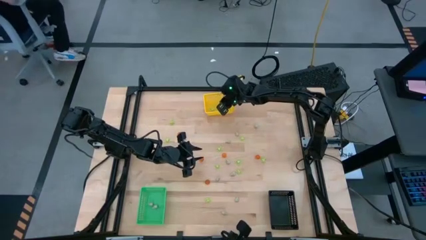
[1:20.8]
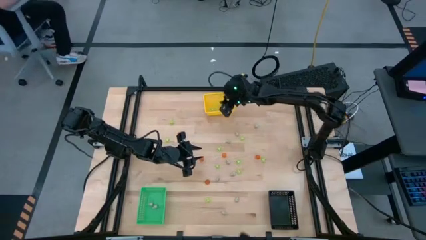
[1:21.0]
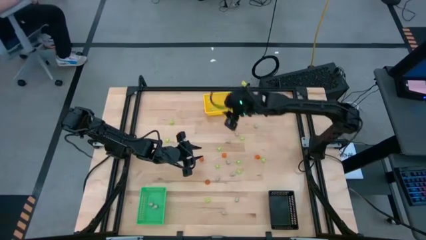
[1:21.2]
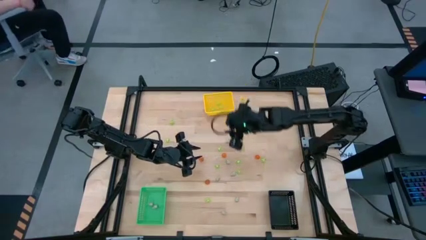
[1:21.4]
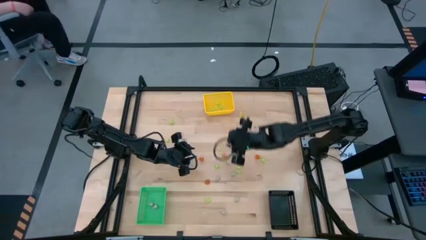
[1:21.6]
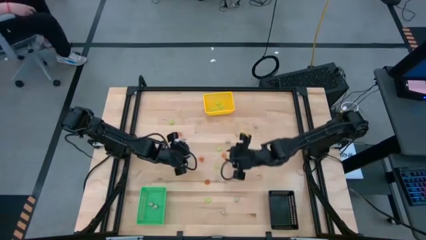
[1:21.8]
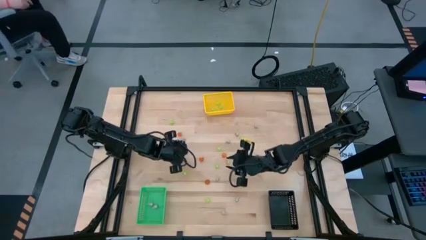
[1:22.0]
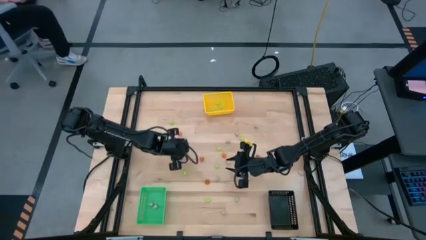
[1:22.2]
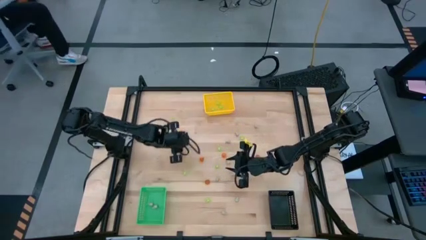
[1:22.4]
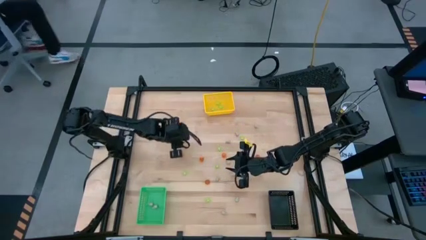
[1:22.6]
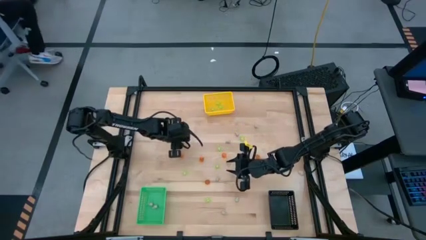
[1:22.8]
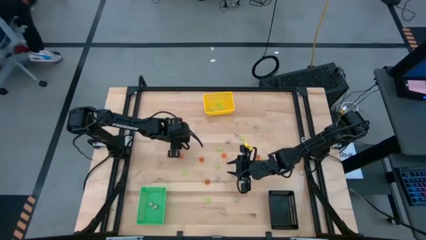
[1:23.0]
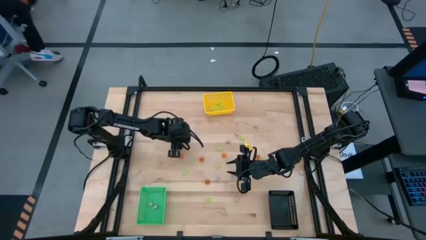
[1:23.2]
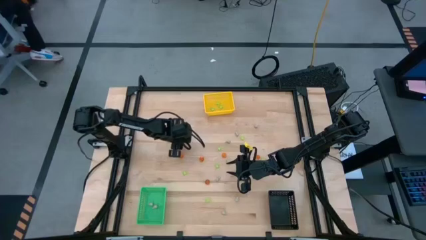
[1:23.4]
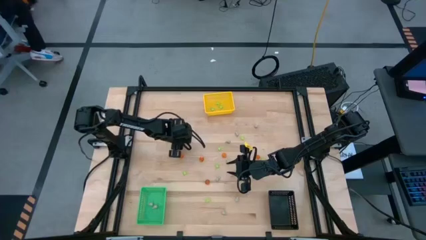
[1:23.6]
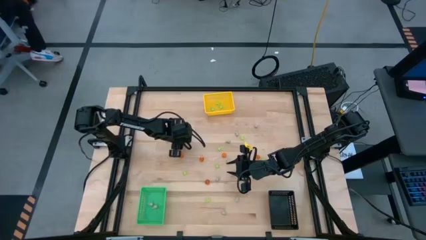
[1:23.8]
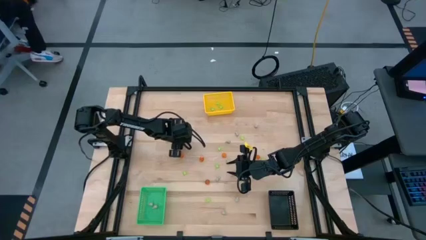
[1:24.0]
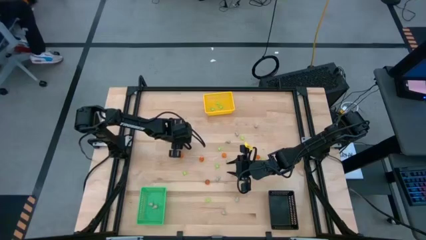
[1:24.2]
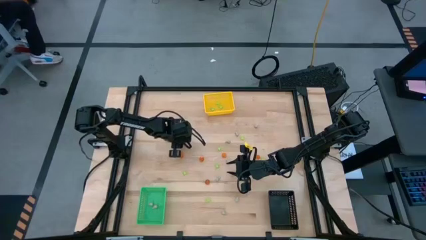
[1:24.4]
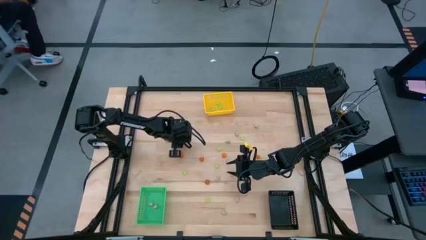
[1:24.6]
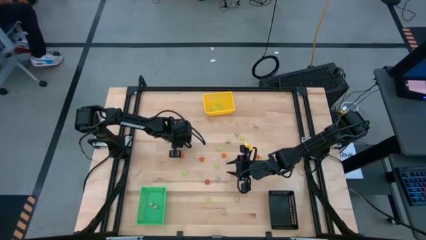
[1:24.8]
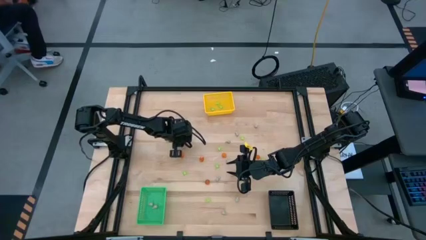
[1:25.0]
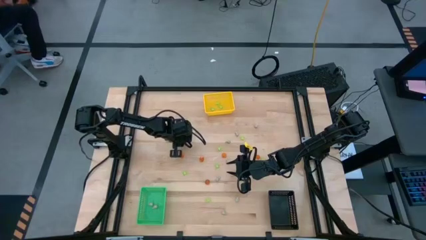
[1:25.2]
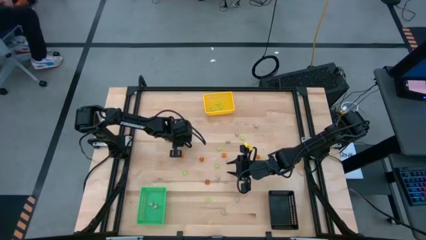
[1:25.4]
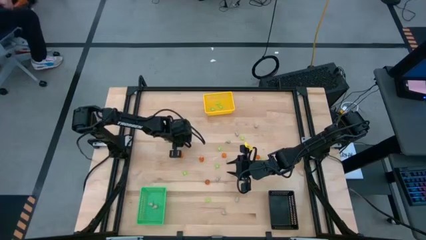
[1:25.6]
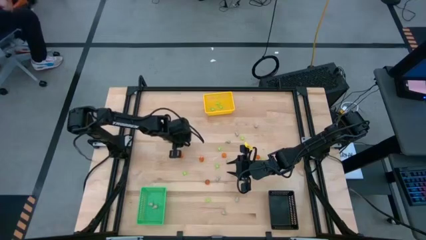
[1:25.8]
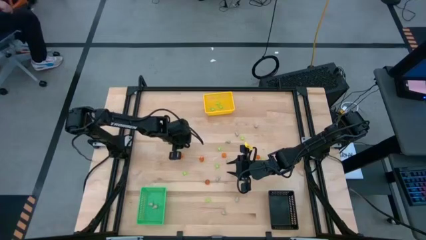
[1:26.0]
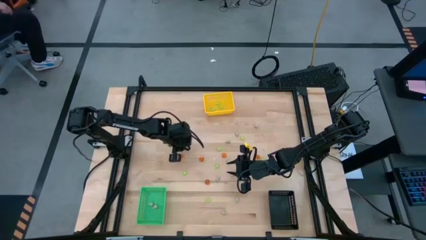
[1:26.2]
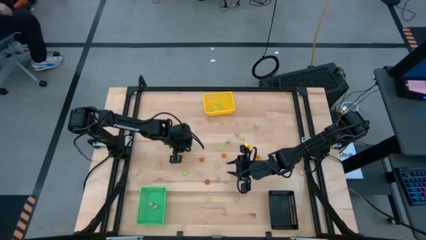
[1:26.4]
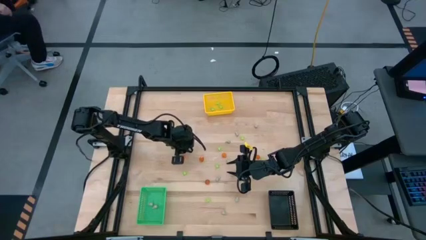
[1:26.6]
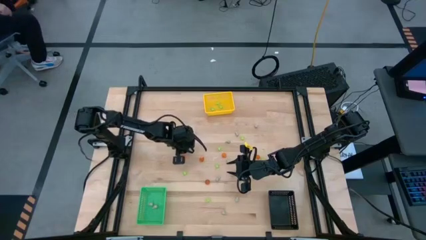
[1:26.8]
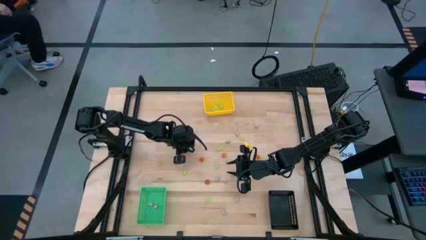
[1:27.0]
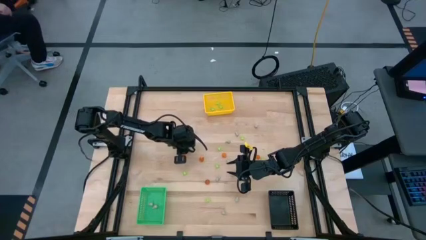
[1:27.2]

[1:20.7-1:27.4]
Task: Sort Halloween decoration
Put the white skull toy into the green bin

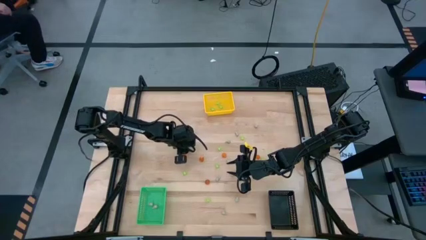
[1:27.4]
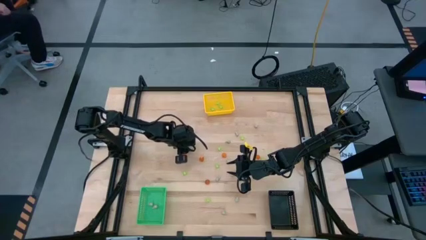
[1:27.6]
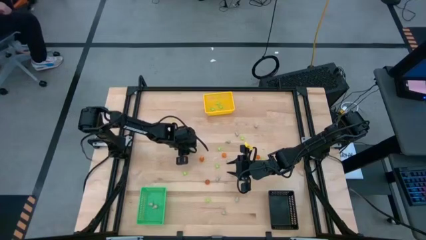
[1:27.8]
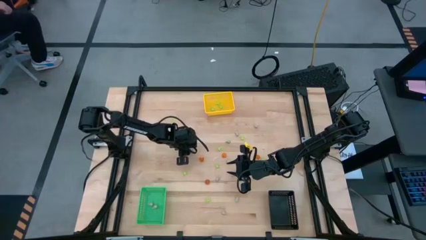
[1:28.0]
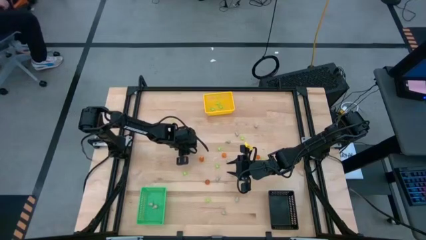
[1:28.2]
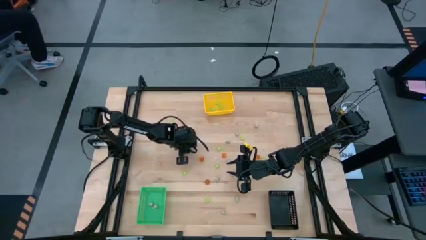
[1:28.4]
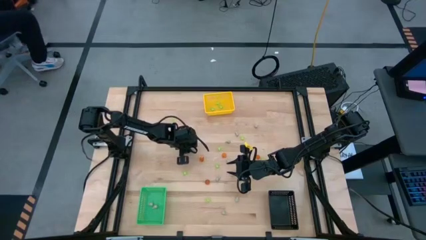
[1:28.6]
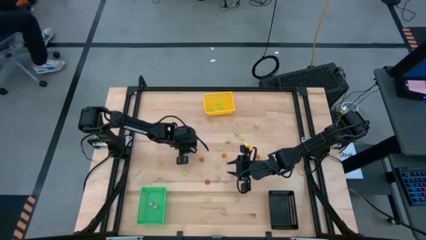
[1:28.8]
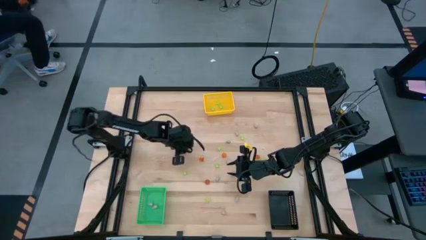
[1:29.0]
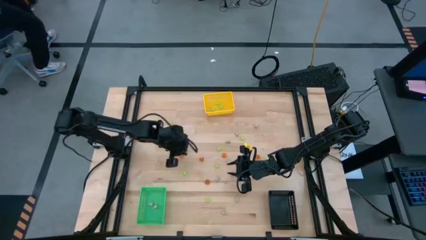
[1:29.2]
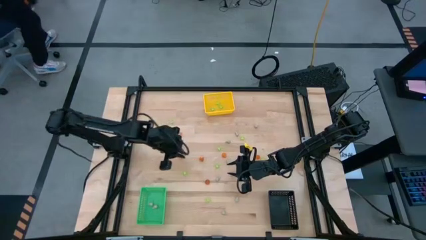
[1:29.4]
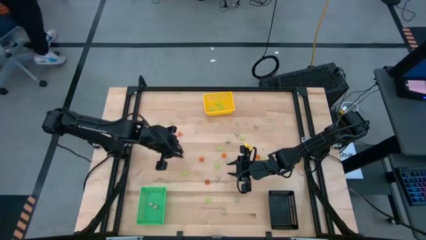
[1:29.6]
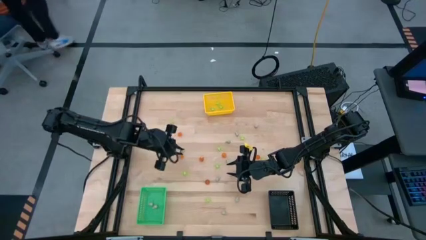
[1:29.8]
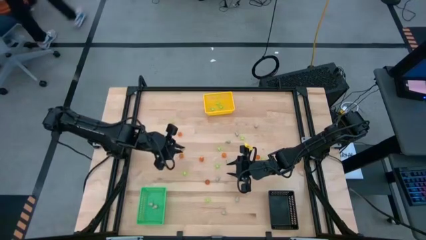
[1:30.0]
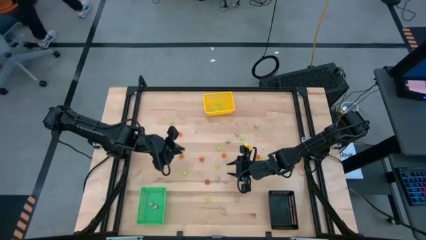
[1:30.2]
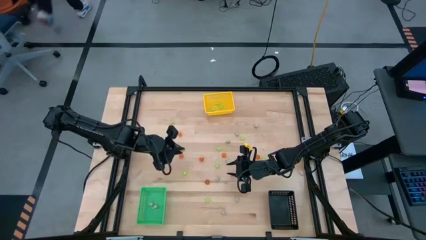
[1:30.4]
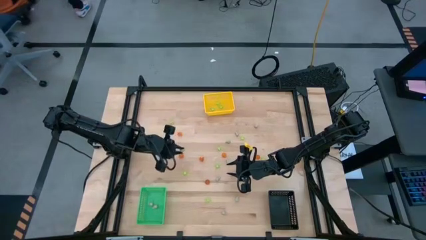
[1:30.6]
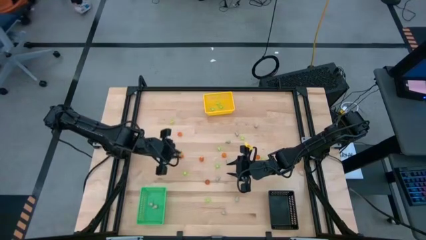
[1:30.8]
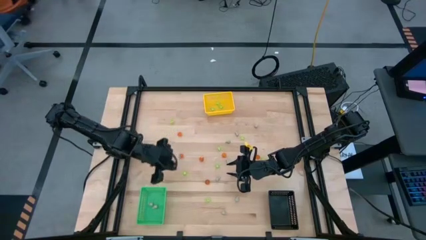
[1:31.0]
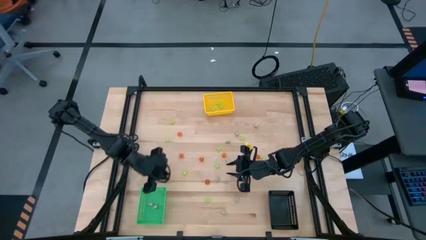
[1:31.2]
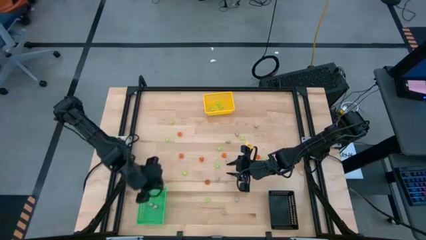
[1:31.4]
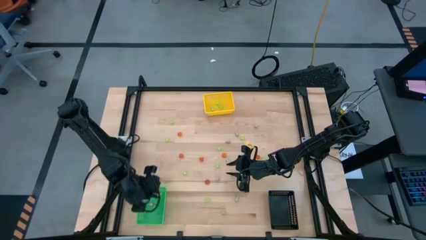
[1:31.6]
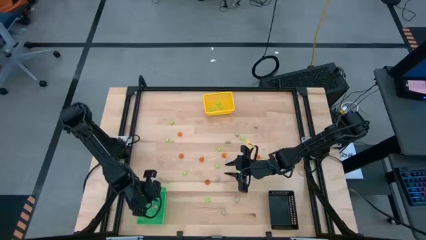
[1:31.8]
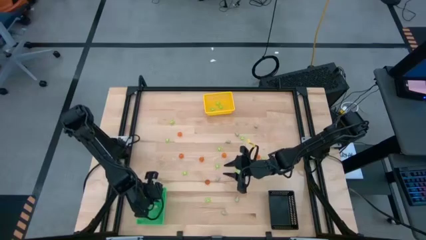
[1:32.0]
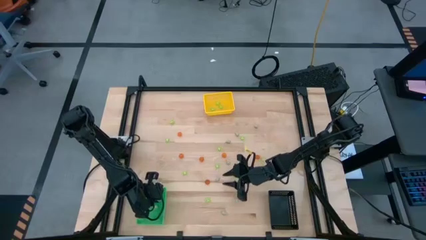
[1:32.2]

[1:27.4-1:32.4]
Put the white skull toy into the green bin
